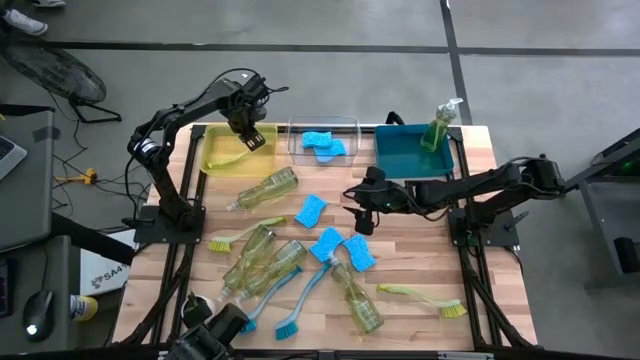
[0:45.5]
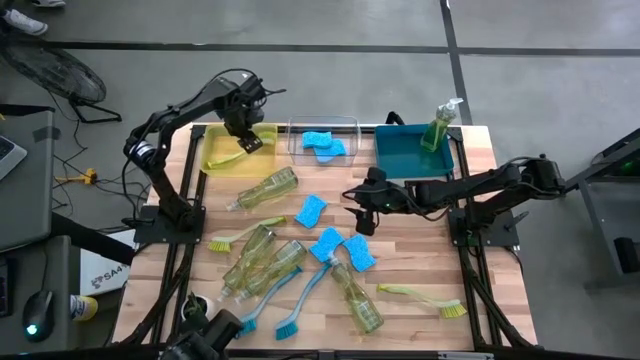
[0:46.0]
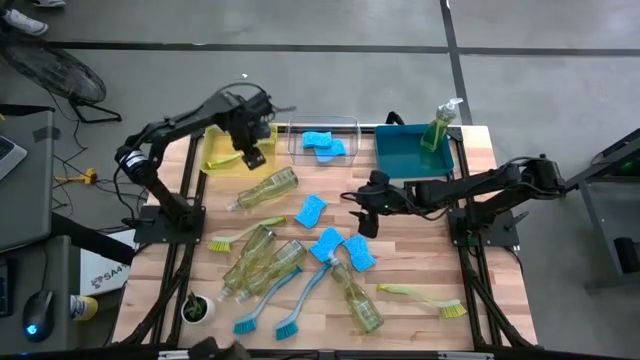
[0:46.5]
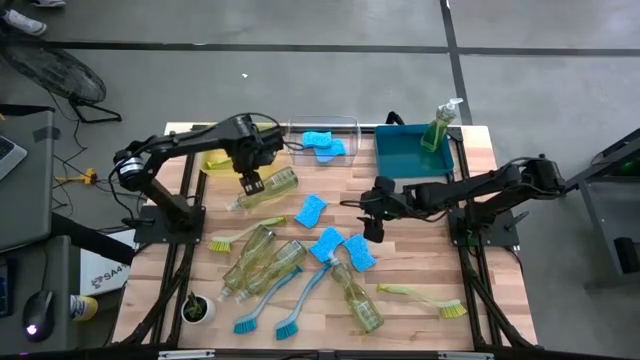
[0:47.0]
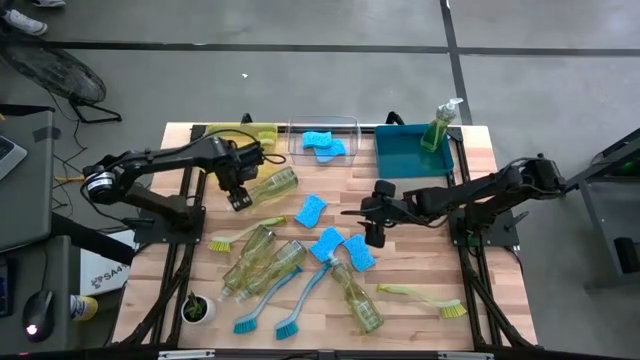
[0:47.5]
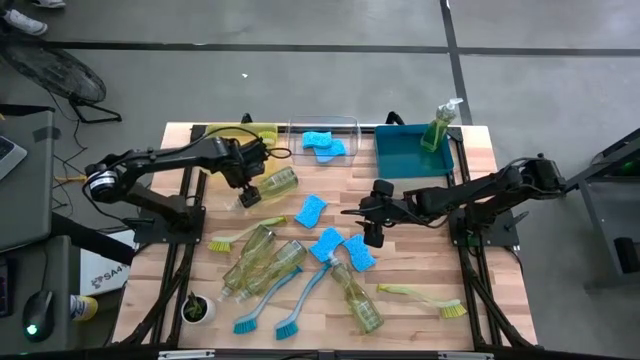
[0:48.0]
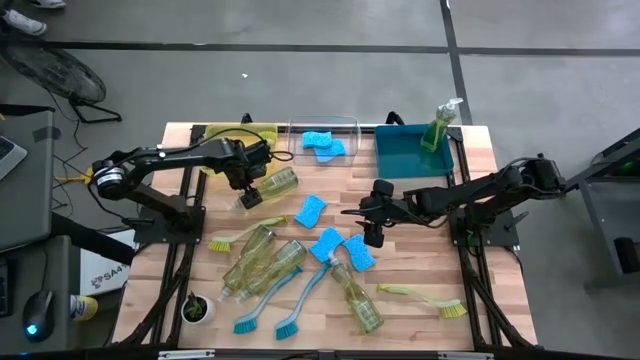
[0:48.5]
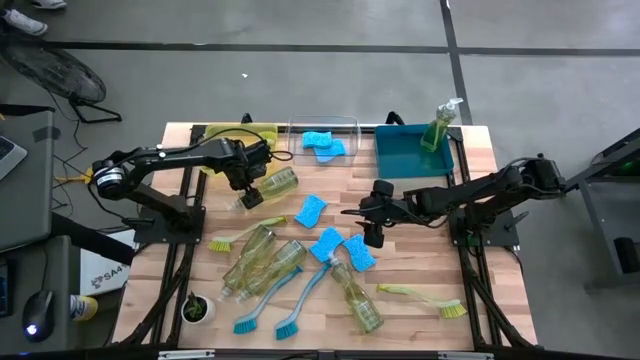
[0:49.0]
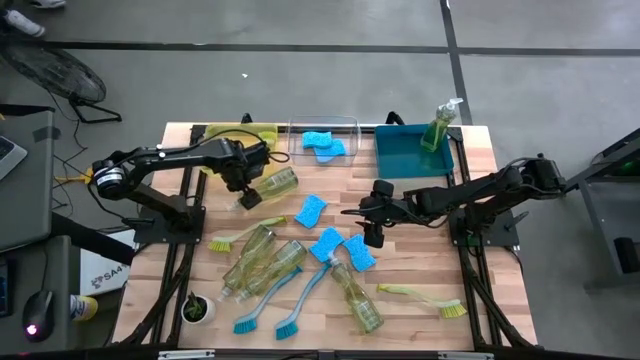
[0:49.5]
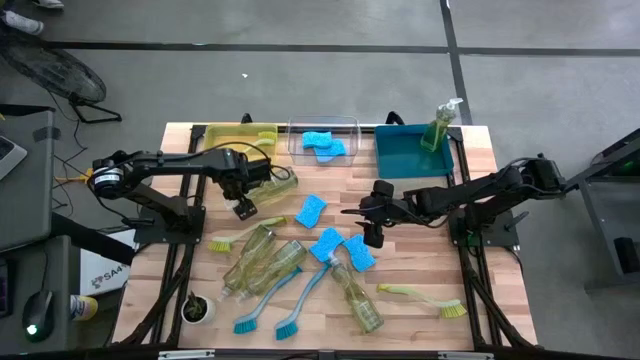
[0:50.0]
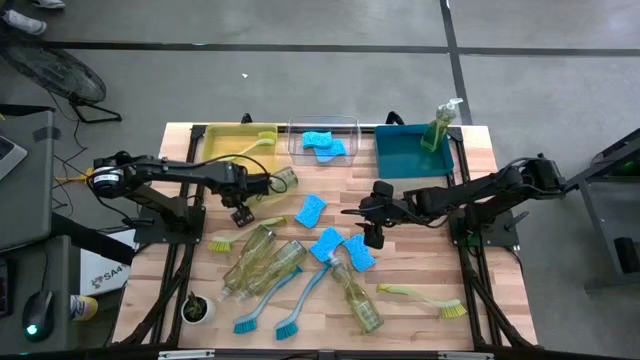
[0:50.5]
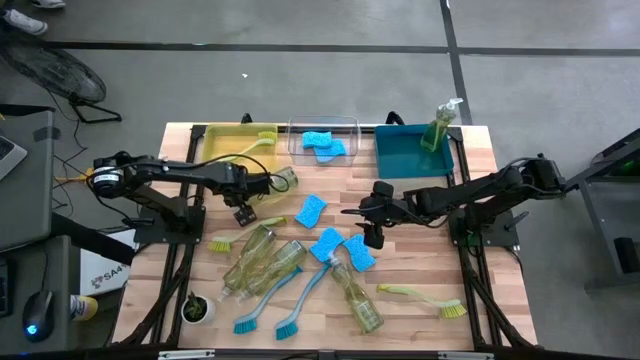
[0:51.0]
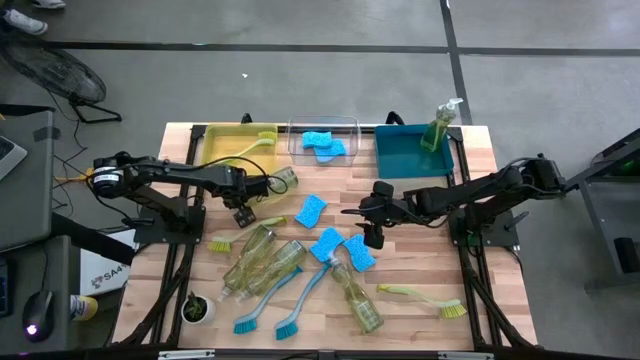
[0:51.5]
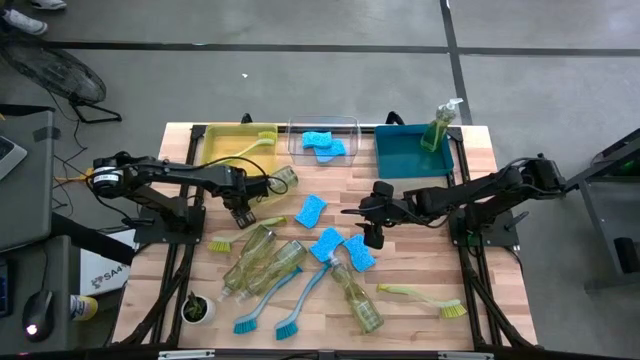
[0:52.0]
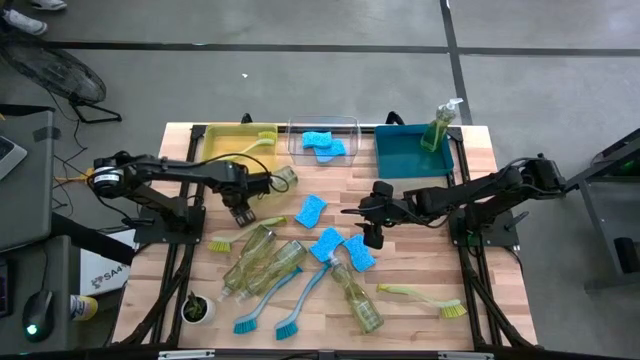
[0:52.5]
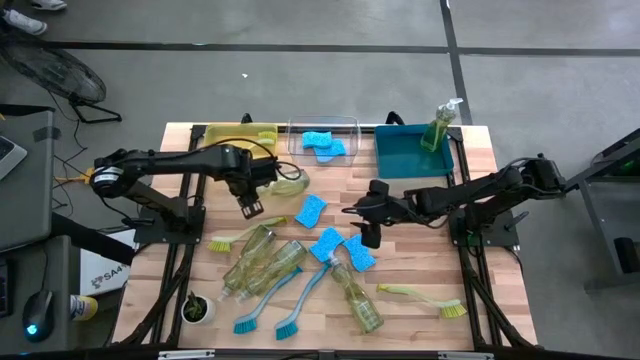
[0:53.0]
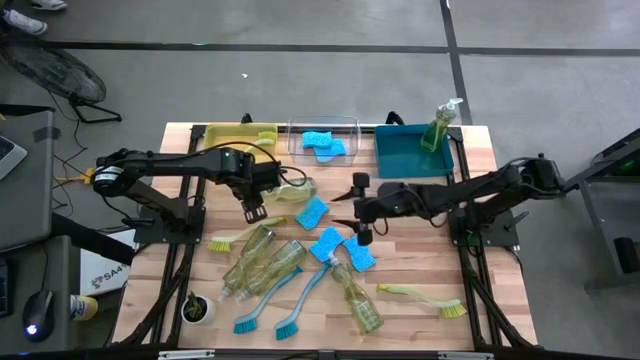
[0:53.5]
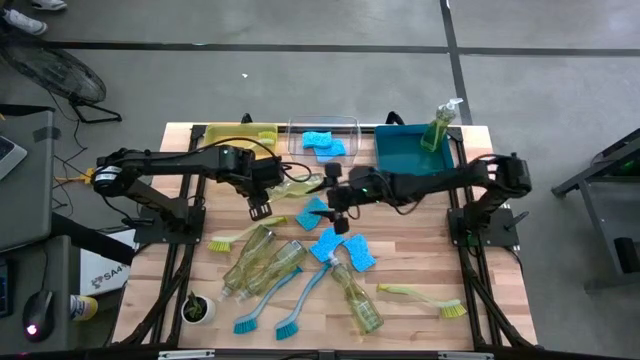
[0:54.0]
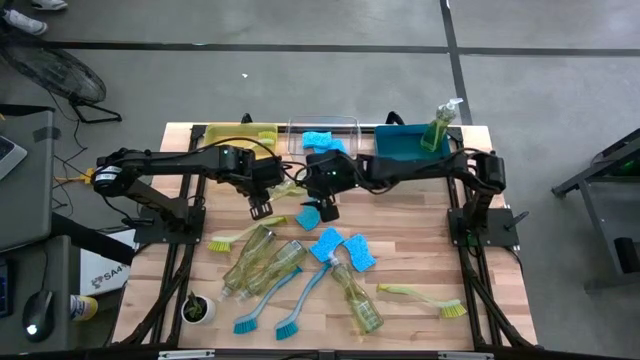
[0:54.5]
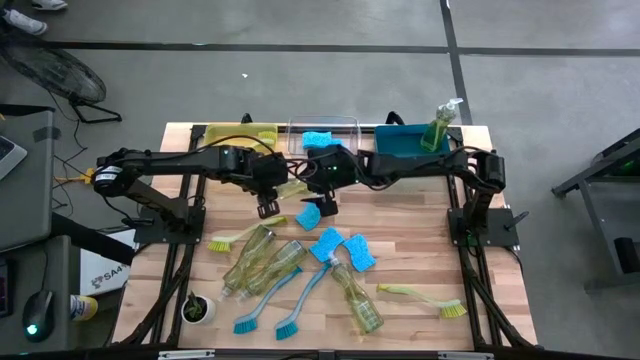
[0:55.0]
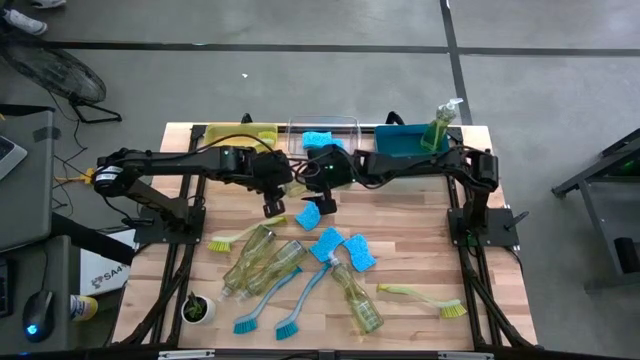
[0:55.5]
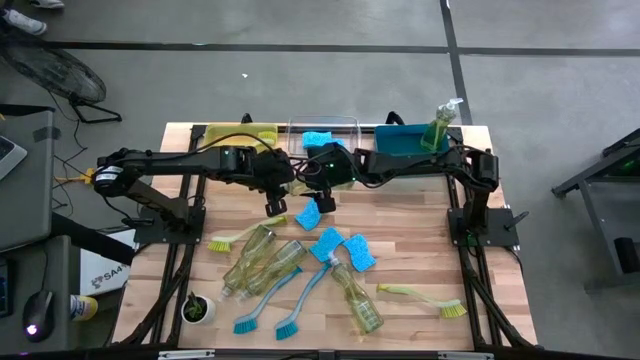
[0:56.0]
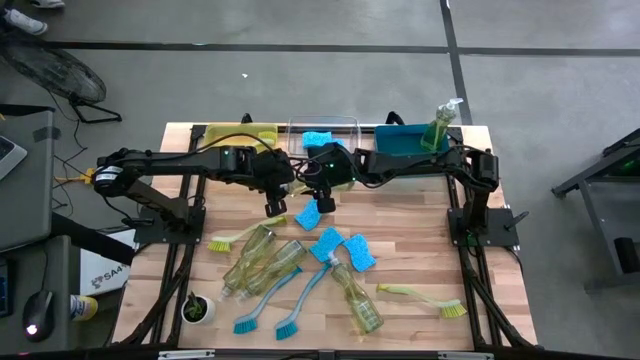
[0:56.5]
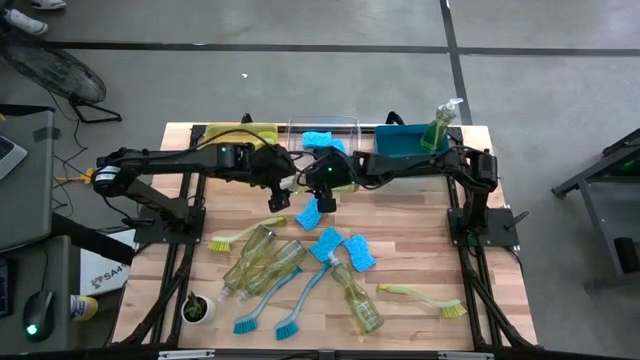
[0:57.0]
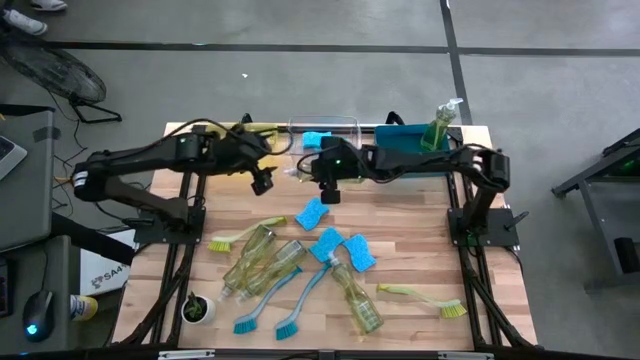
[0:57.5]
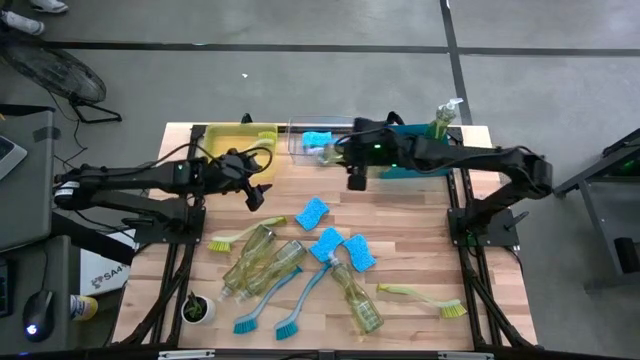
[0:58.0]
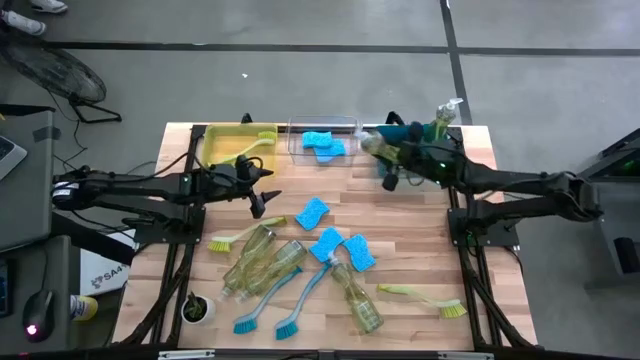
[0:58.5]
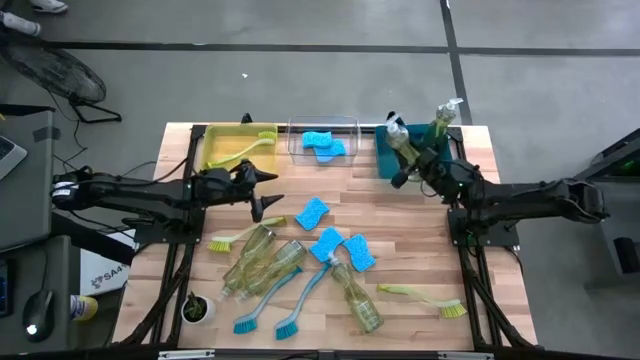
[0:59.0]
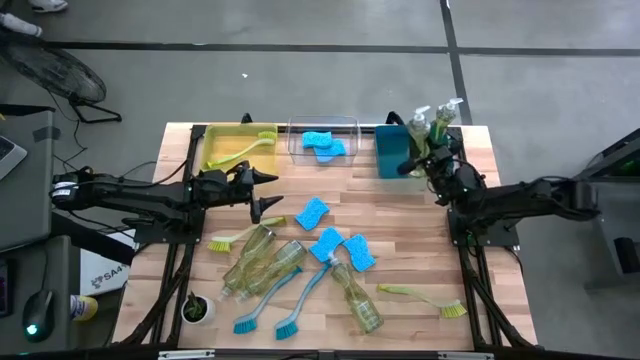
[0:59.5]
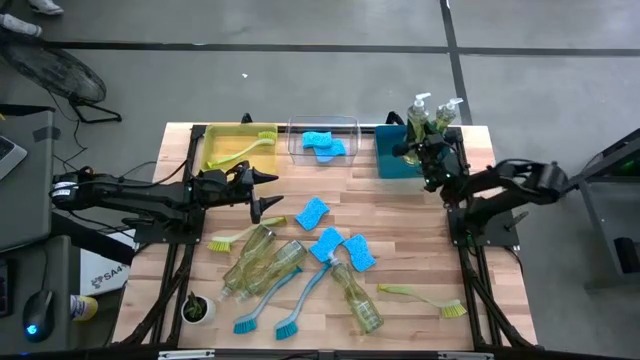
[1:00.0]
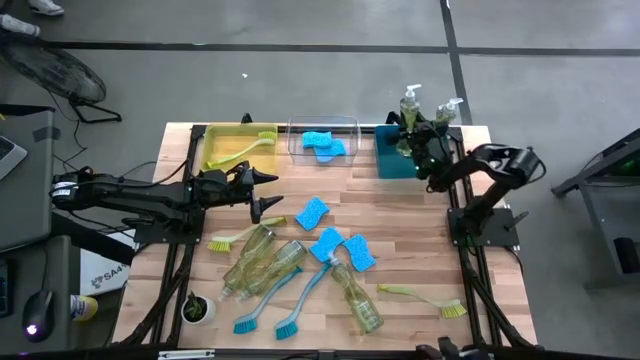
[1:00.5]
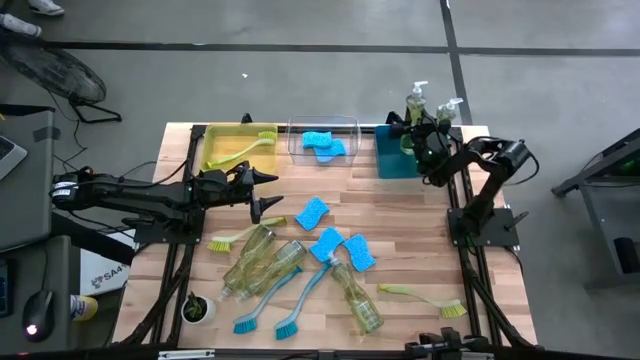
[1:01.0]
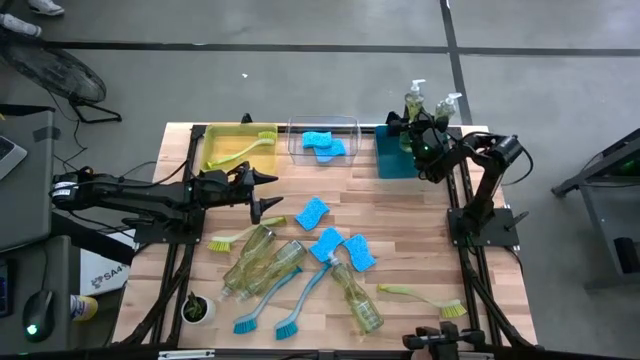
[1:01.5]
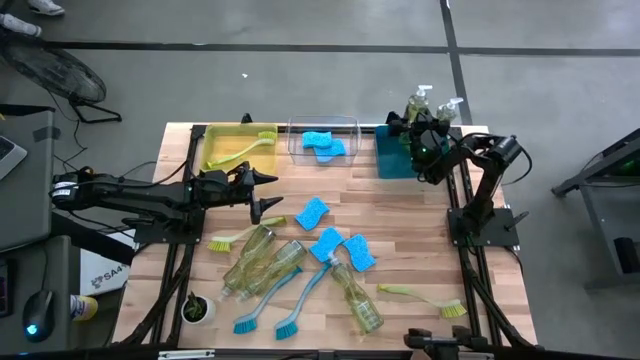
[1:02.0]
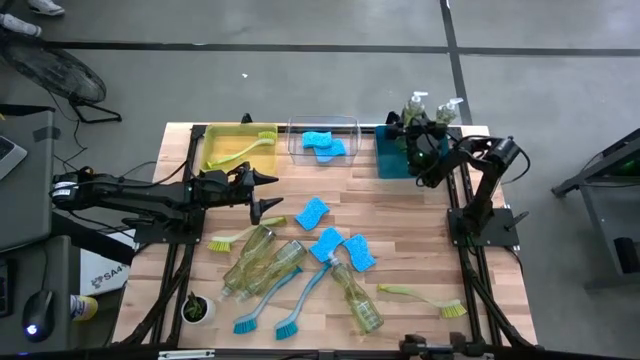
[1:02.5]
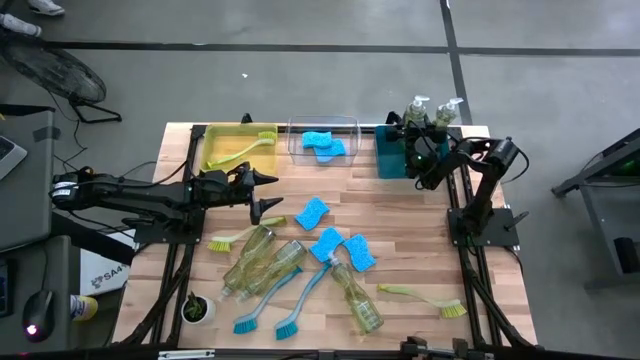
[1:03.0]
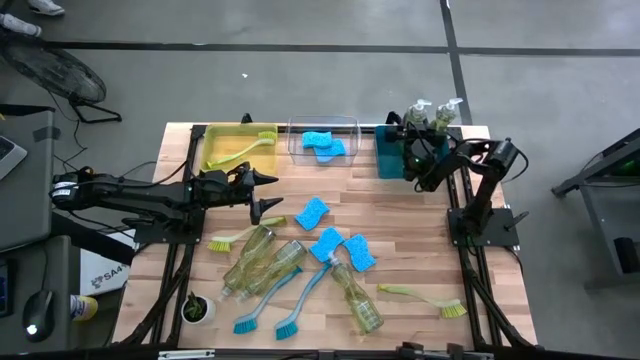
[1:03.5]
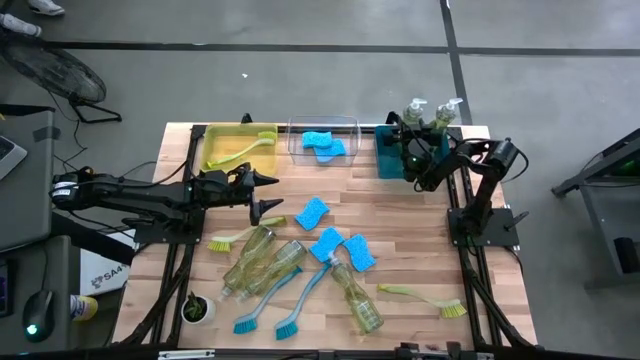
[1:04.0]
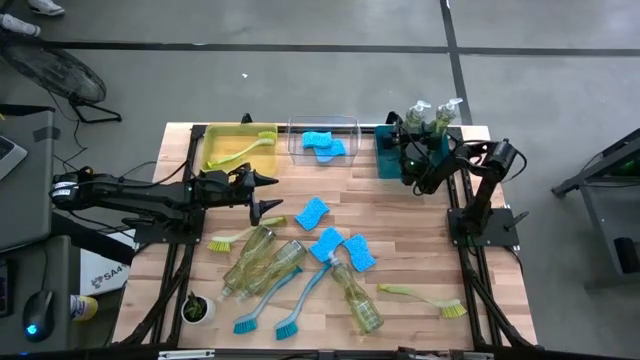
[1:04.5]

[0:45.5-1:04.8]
Task: Pick & Place Kitchen Sink Supplies
Put the dish soap into the blue bin

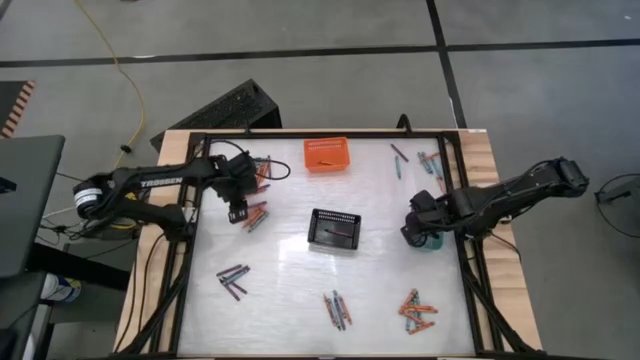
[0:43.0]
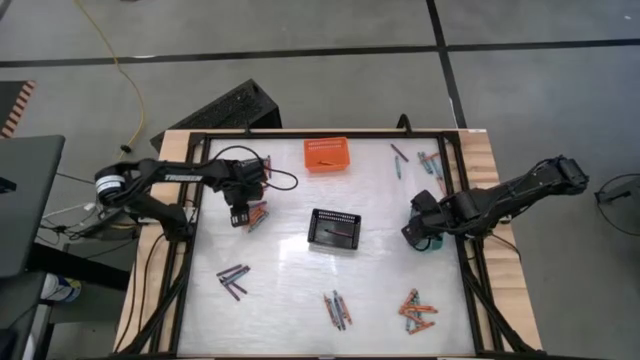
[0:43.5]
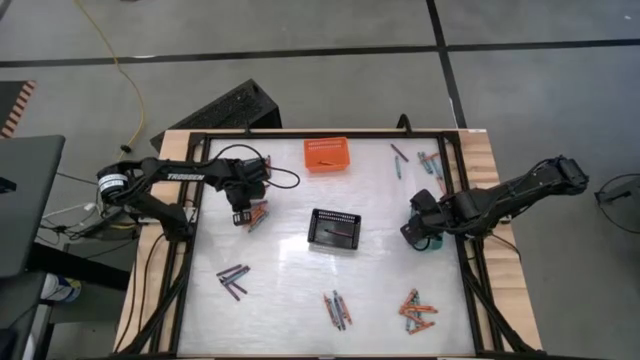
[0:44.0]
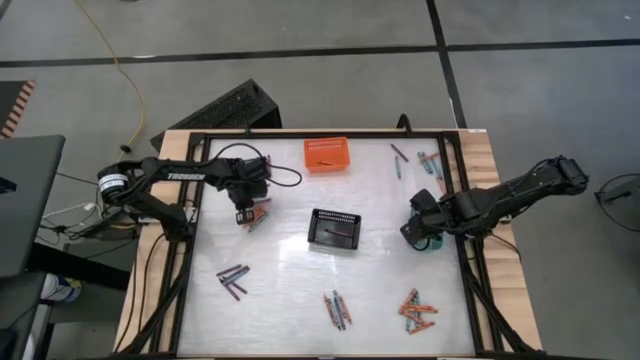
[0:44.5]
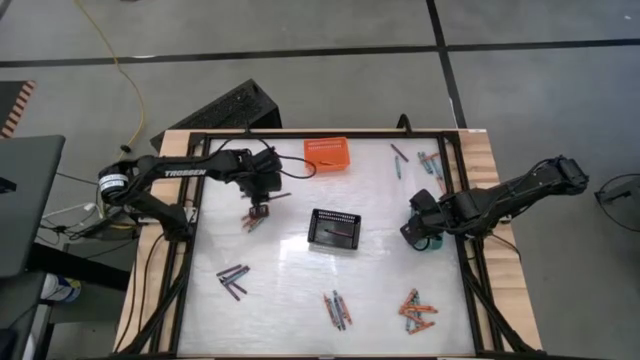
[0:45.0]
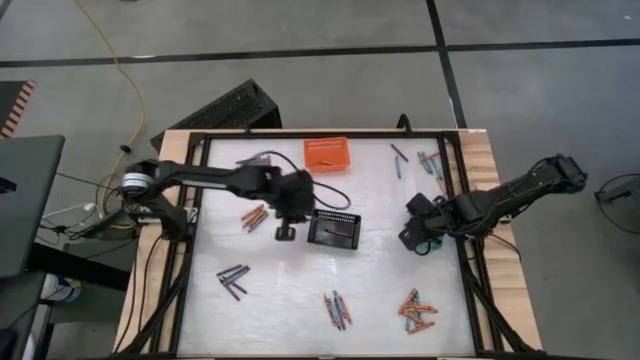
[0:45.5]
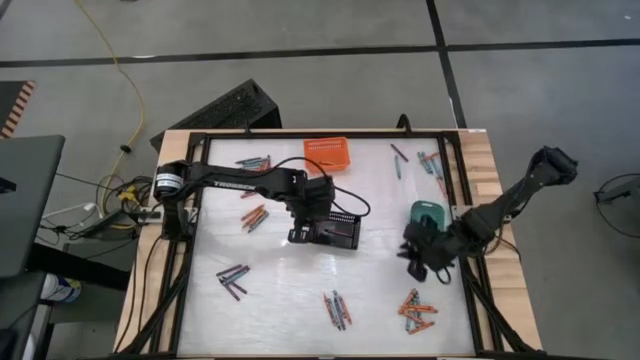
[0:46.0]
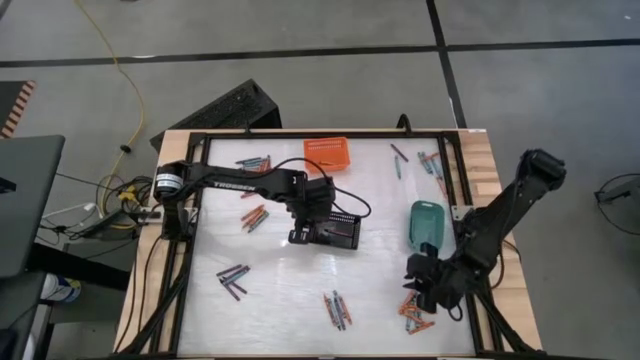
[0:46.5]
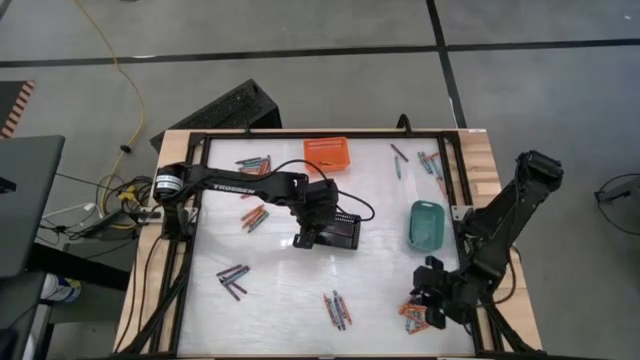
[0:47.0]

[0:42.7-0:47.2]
Task: Sort crayons
Put the violet crayon into the black bin
